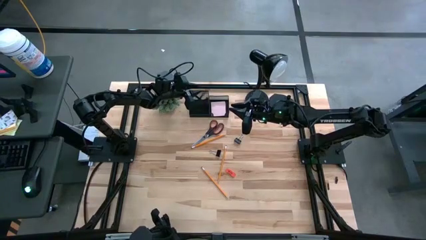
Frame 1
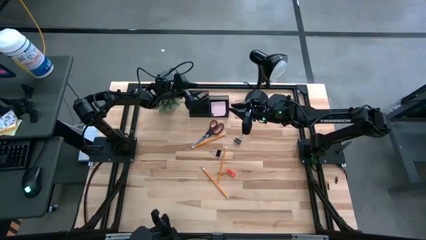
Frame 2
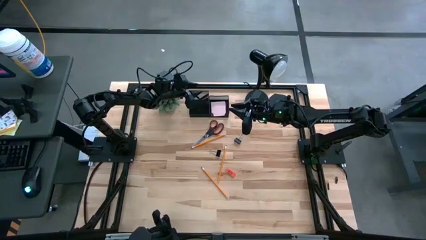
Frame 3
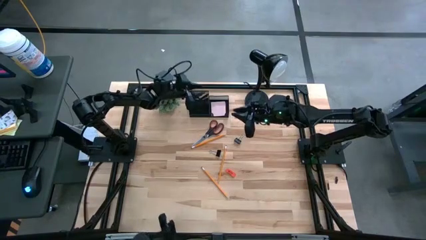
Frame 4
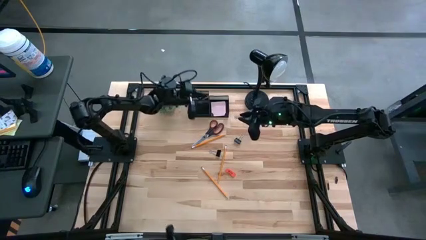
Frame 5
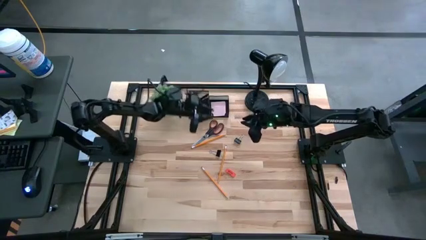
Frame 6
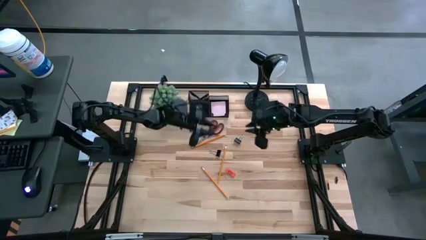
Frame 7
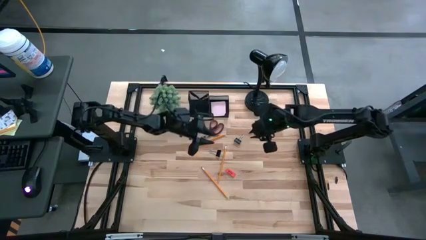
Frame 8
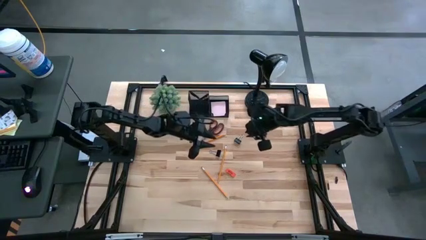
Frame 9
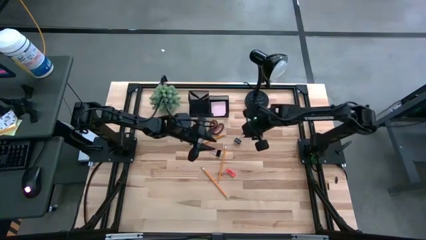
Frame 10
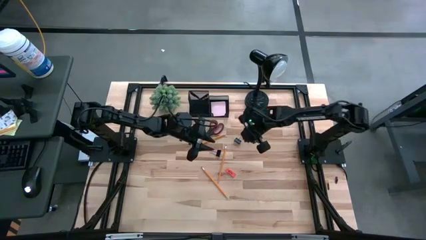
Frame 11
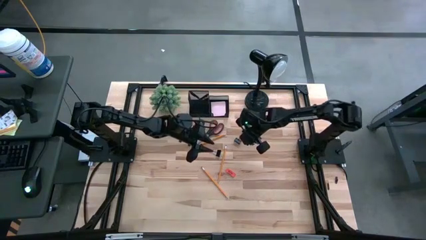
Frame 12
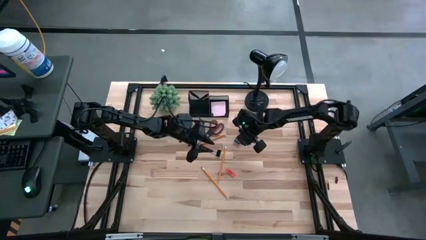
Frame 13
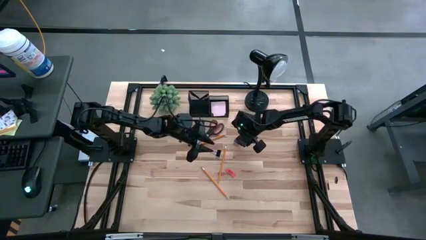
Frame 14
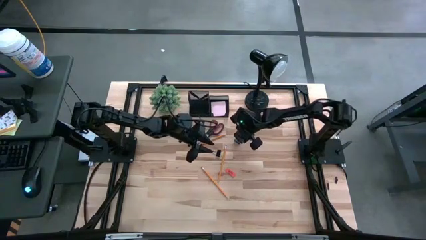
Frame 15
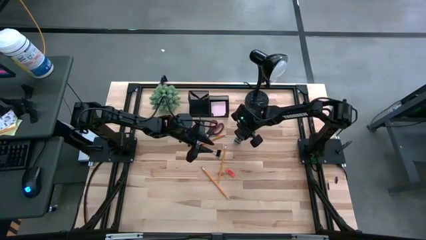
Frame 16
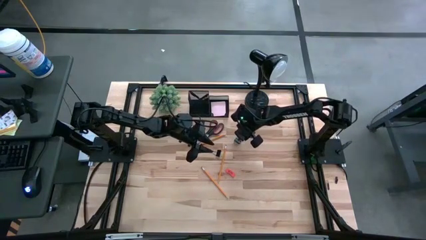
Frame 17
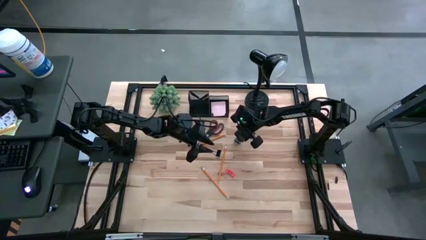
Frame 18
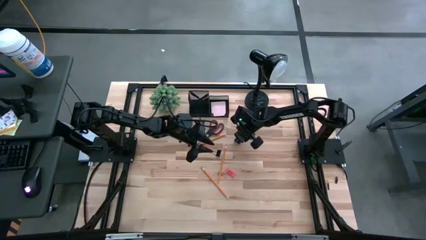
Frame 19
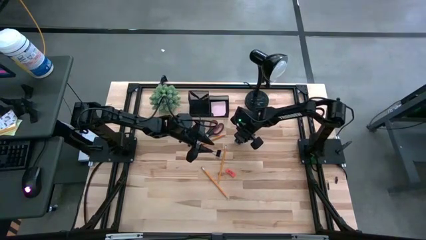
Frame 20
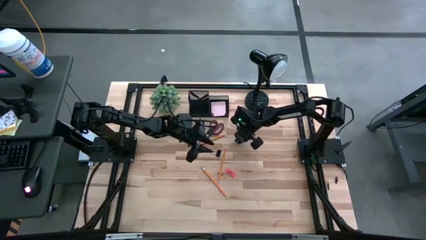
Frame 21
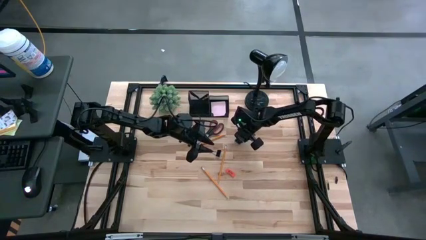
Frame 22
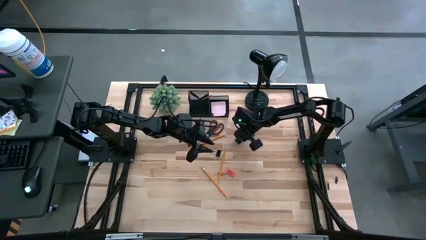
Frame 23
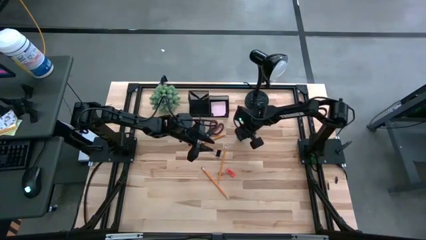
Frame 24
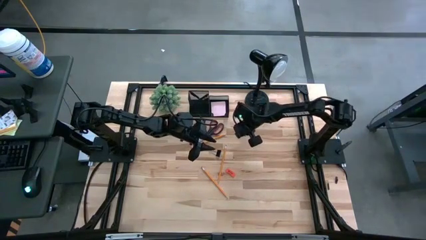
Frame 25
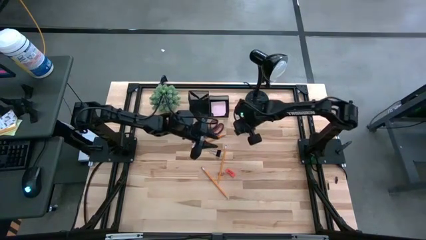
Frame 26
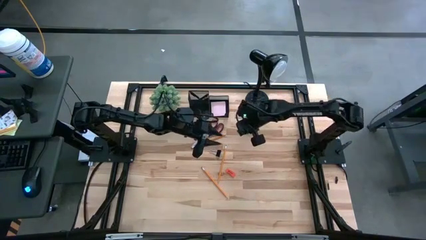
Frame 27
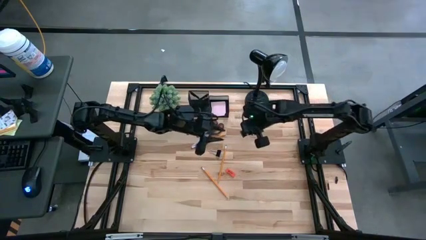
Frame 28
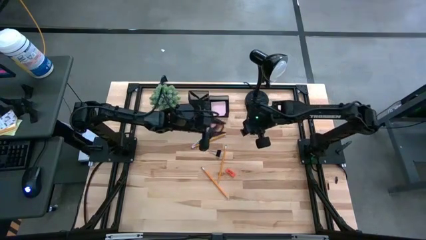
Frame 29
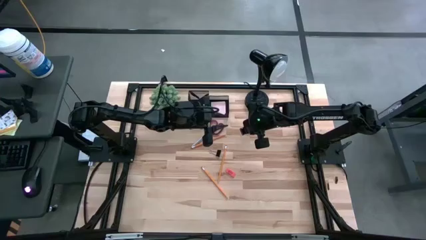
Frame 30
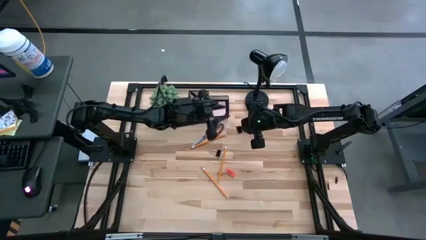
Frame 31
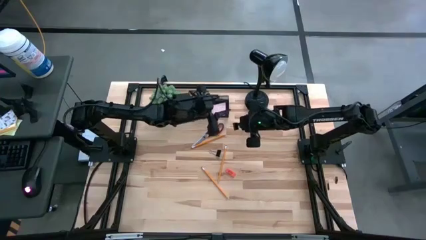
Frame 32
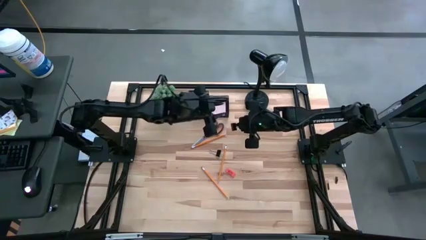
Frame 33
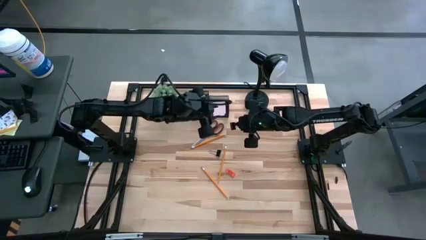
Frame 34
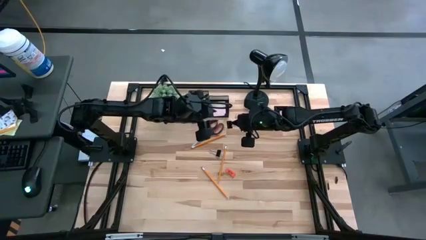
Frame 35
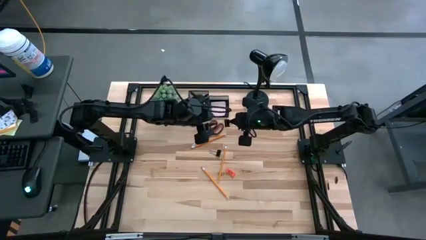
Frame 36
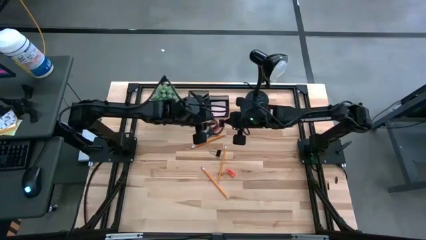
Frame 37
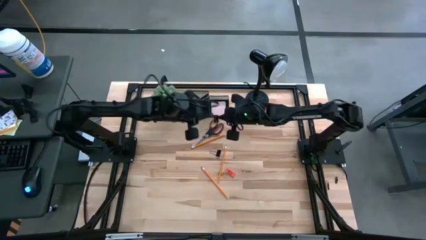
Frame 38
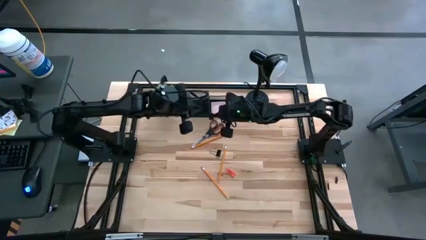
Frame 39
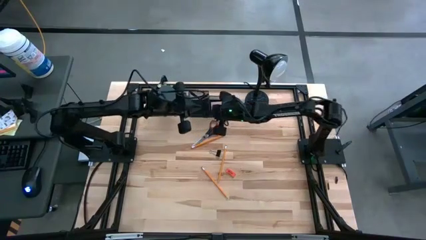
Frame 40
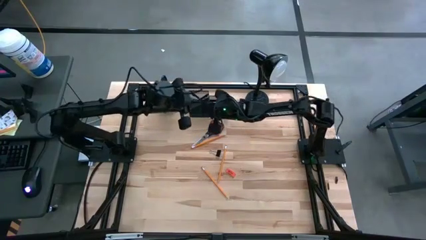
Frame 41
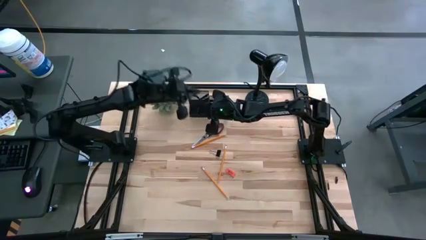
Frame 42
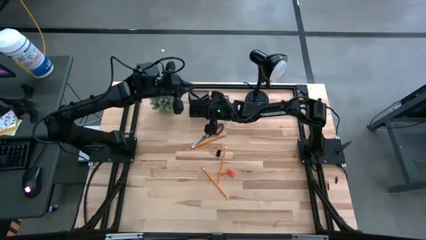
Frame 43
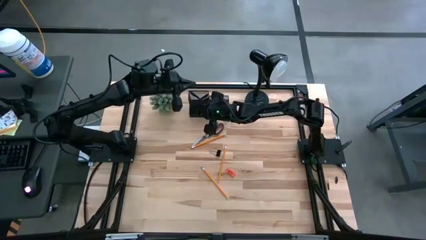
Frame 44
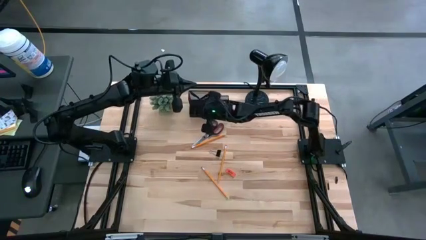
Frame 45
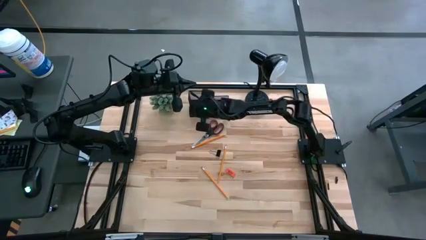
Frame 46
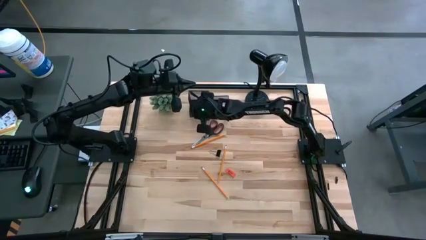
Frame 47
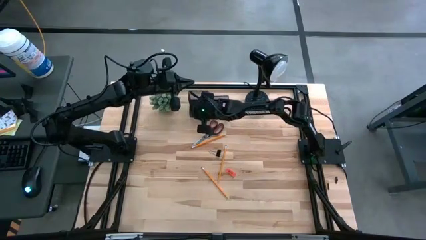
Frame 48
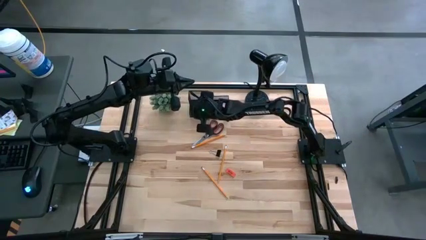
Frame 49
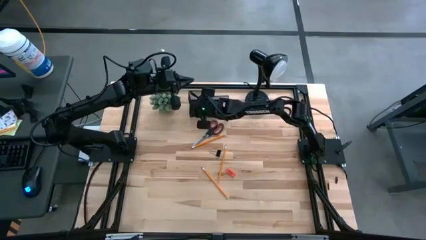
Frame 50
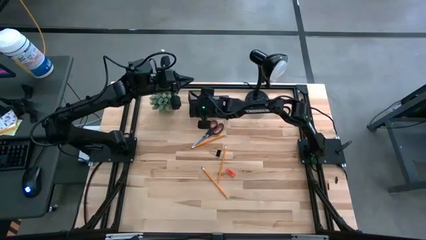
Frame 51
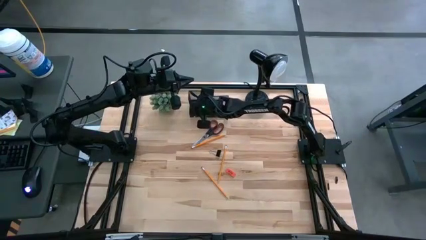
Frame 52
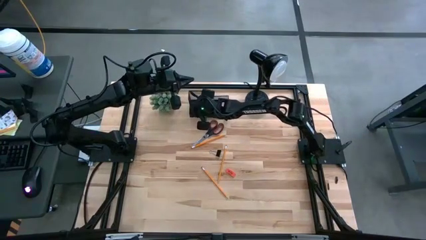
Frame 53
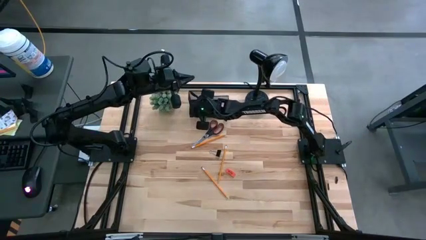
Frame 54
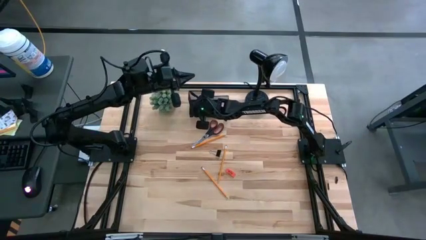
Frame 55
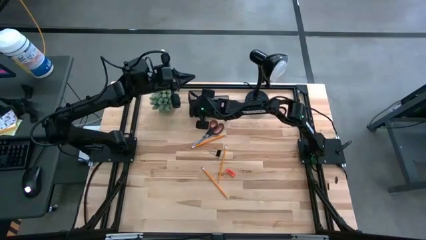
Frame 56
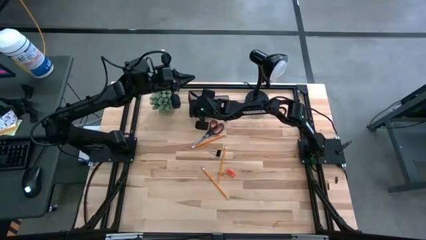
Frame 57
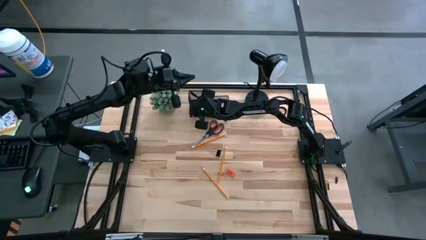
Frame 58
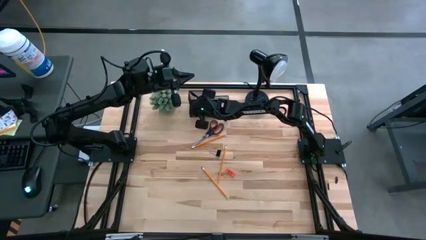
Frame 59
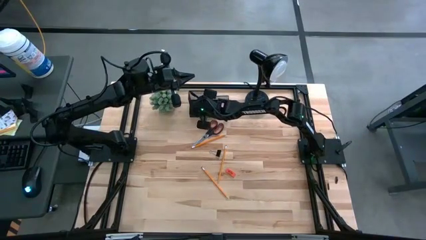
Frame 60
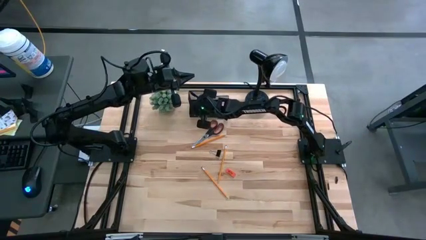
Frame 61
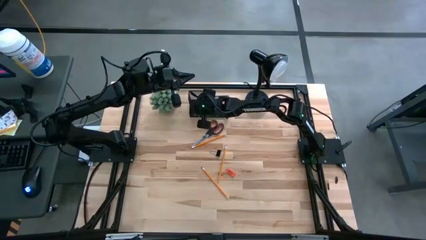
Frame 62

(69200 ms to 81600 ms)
Task: Pick and place office supplies into organizer
Put the right black binder clip into the black desk organizer

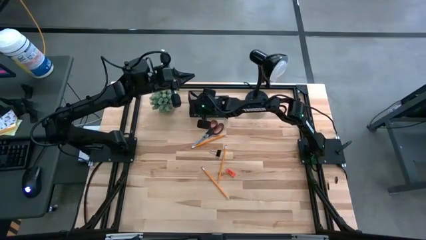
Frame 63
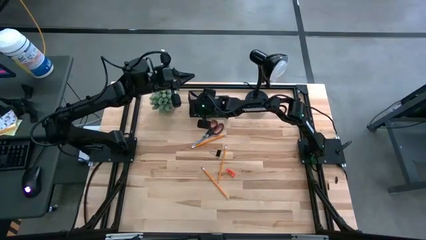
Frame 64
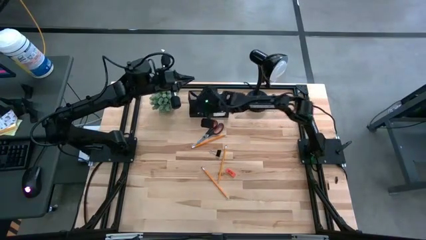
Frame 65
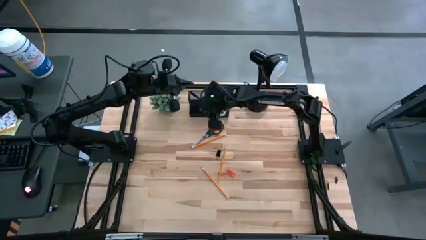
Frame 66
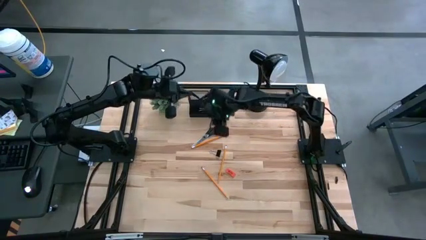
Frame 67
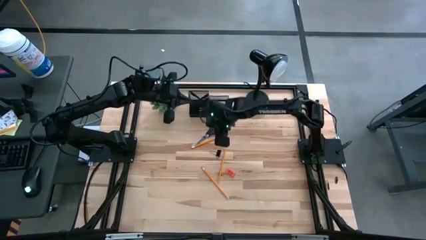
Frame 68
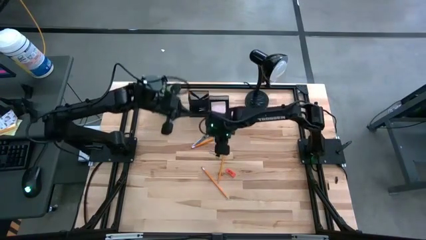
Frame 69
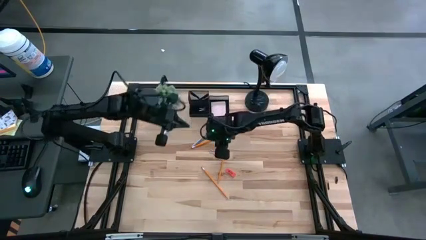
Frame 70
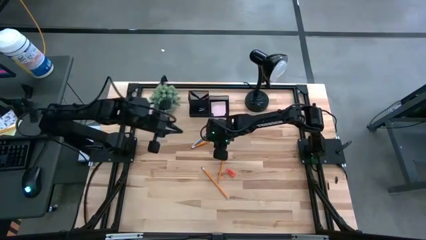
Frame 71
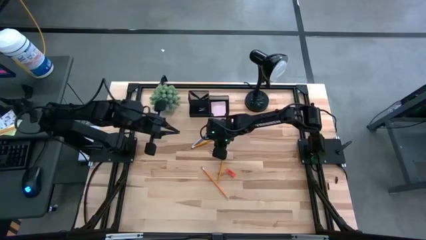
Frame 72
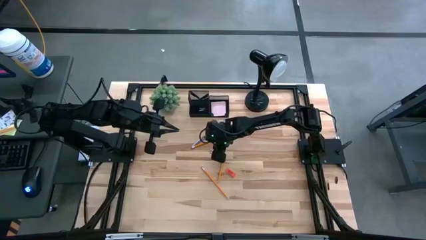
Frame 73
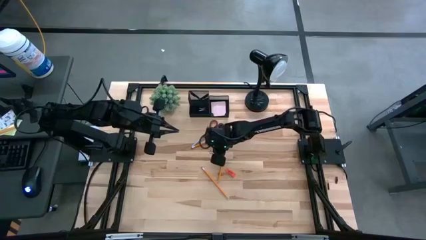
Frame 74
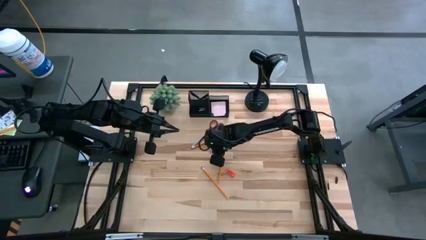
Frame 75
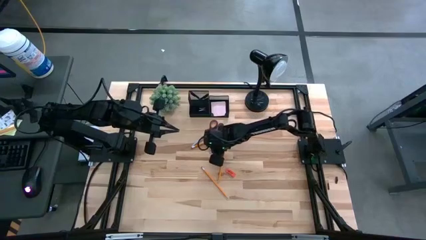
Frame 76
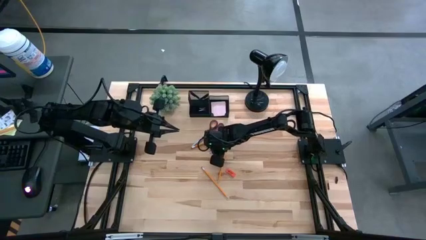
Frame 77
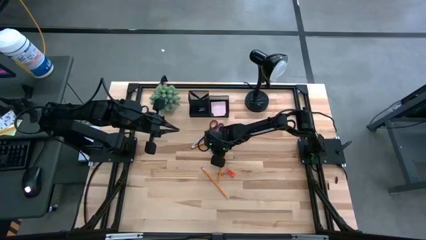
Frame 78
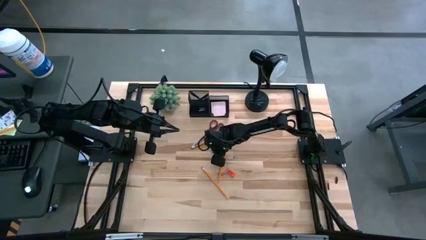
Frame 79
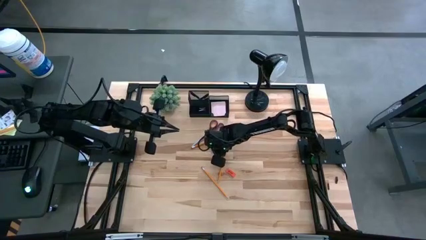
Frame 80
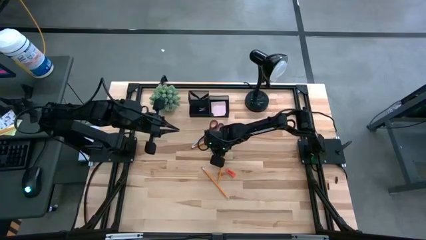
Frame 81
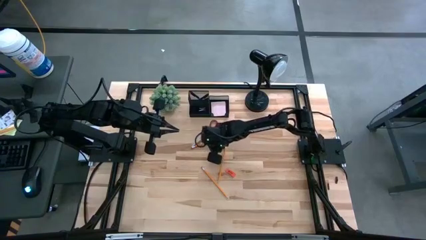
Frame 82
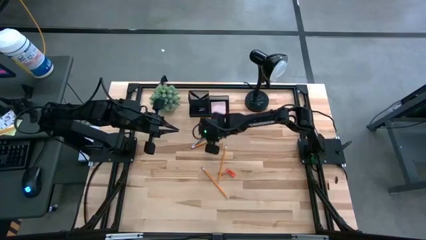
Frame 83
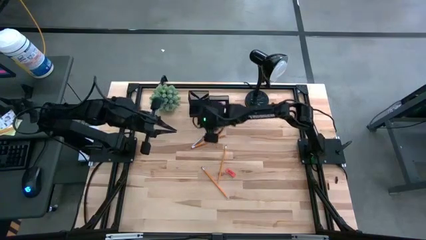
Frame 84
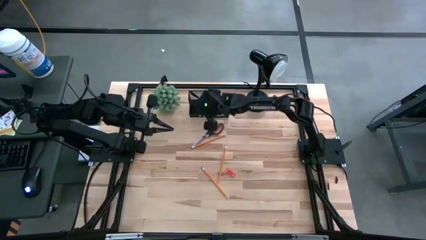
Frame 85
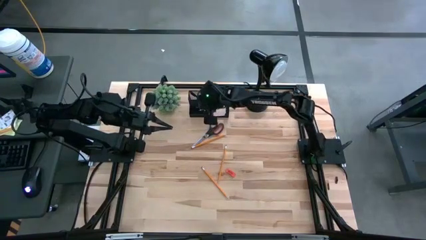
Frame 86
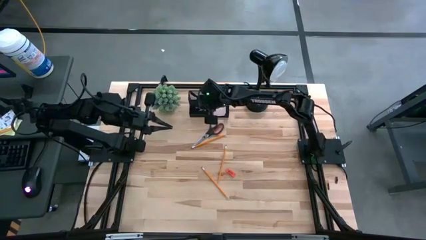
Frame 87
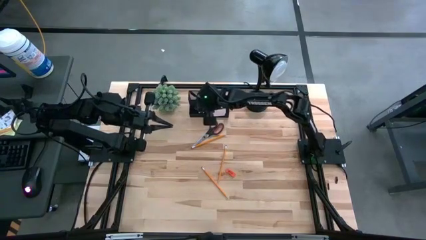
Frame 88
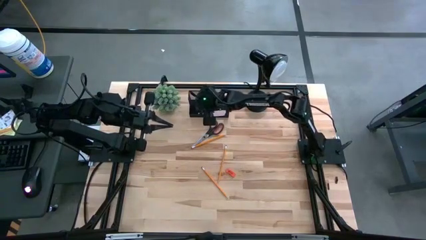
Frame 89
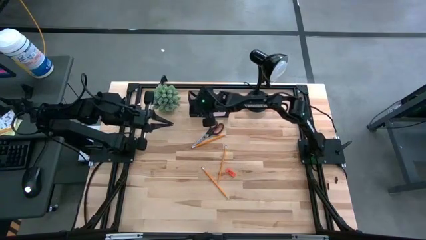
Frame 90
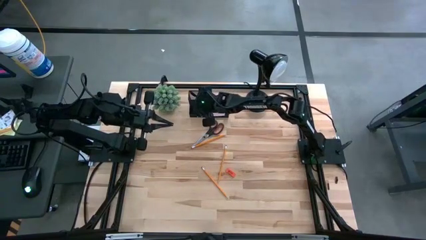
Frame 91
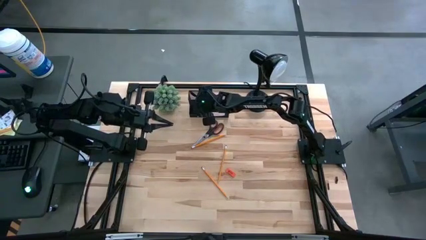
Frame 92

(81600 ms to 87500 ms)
Put the black binder clip into the black desk organizer
